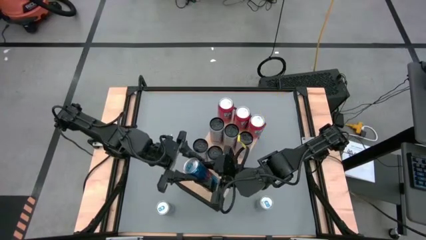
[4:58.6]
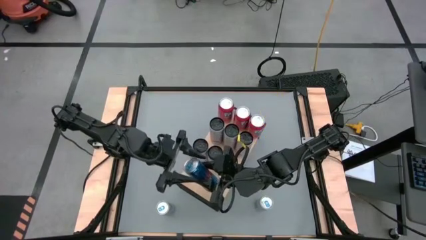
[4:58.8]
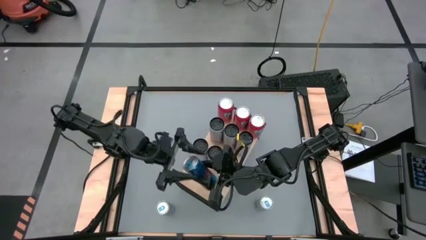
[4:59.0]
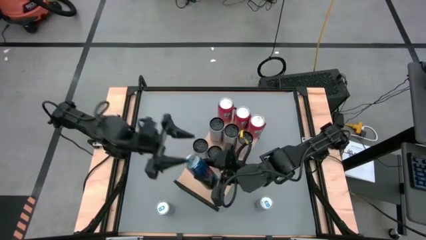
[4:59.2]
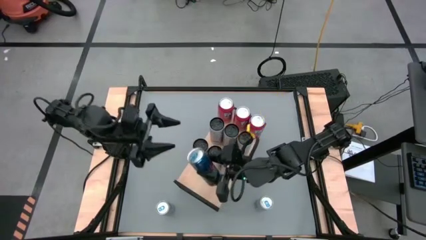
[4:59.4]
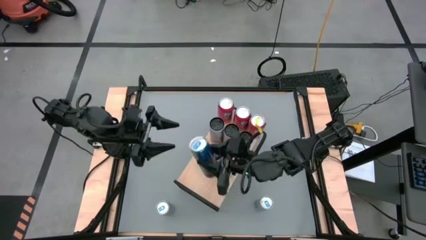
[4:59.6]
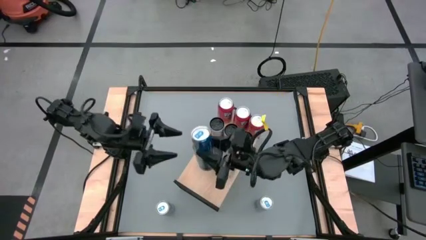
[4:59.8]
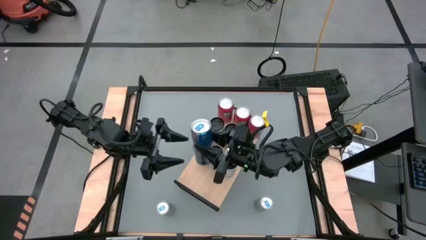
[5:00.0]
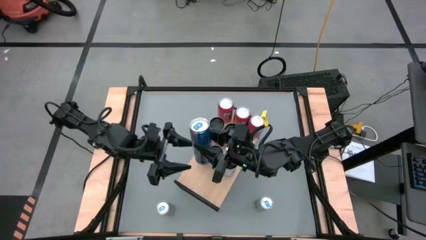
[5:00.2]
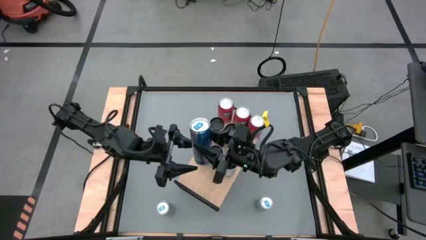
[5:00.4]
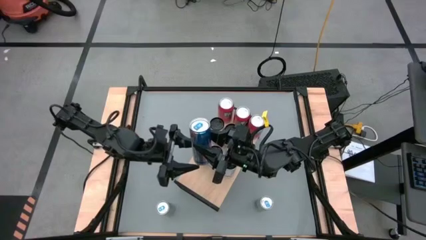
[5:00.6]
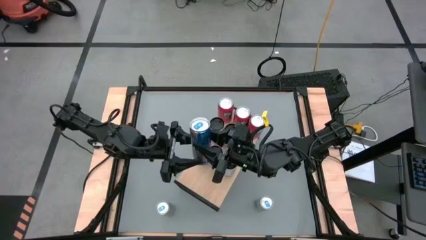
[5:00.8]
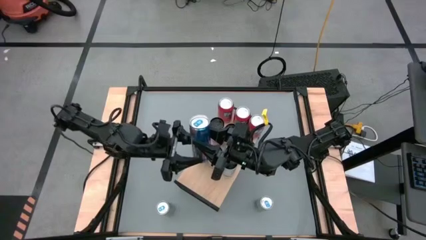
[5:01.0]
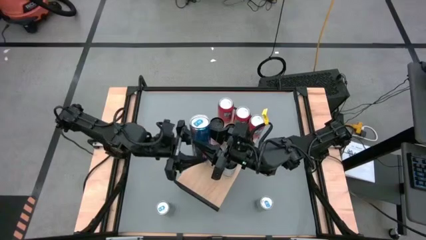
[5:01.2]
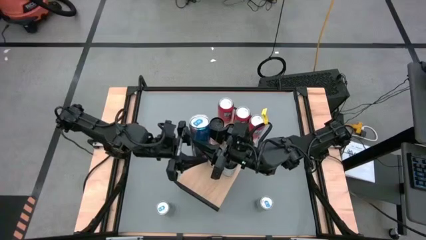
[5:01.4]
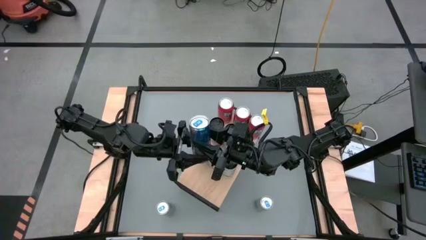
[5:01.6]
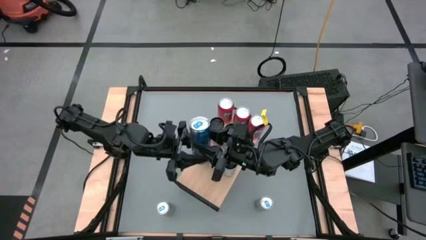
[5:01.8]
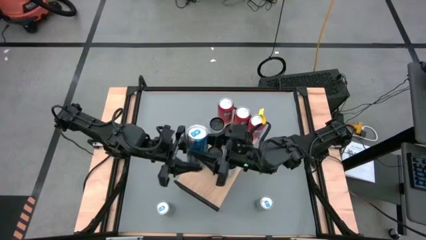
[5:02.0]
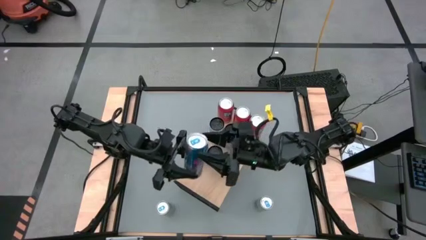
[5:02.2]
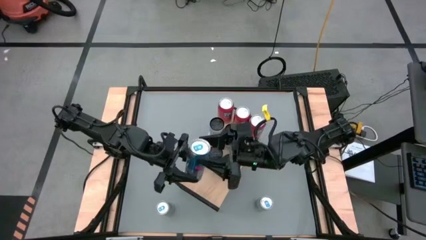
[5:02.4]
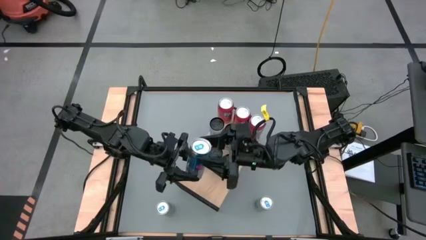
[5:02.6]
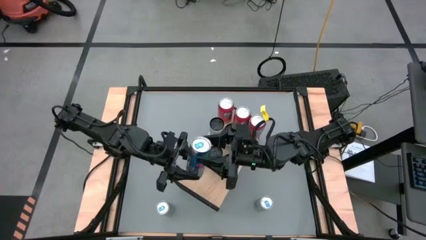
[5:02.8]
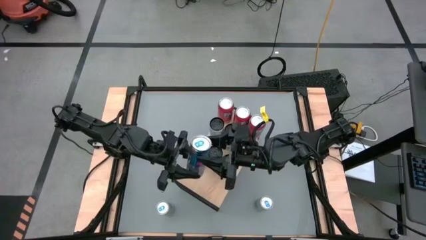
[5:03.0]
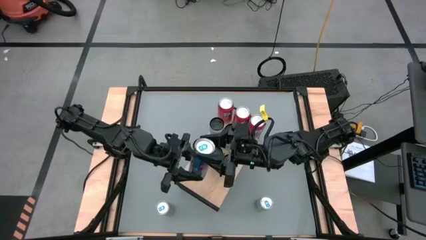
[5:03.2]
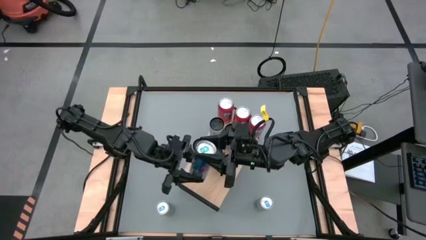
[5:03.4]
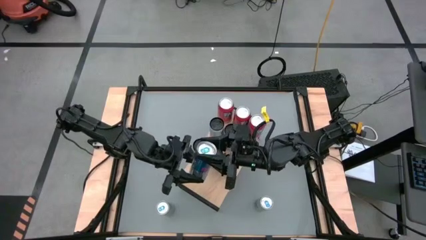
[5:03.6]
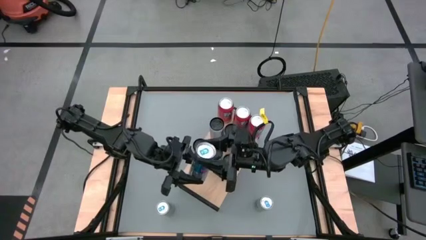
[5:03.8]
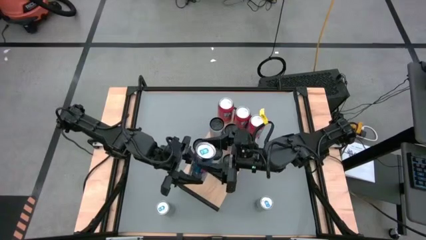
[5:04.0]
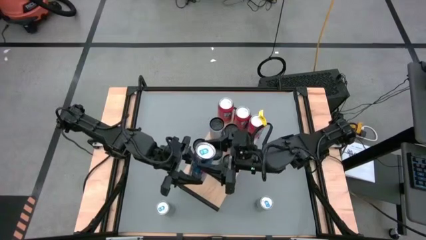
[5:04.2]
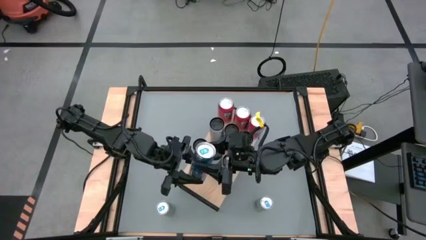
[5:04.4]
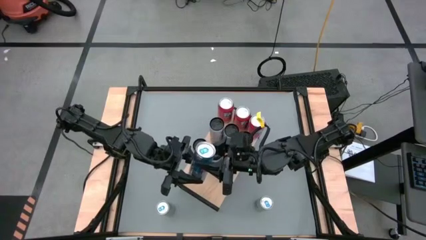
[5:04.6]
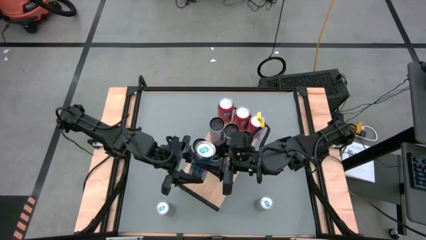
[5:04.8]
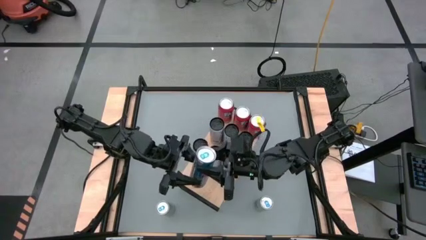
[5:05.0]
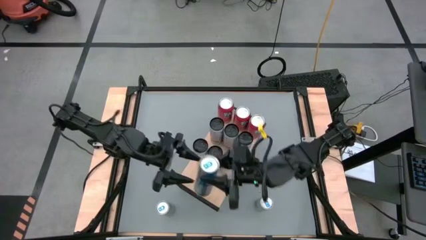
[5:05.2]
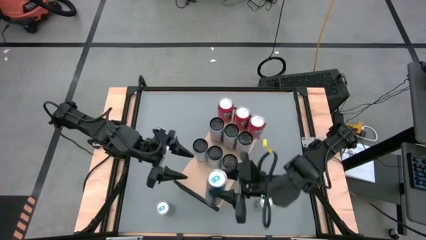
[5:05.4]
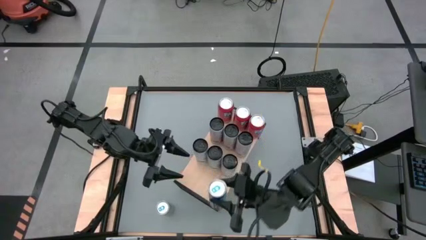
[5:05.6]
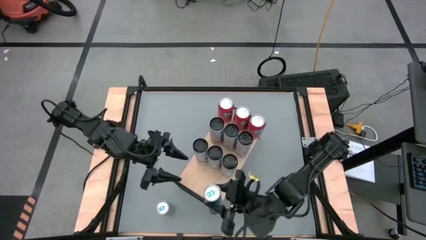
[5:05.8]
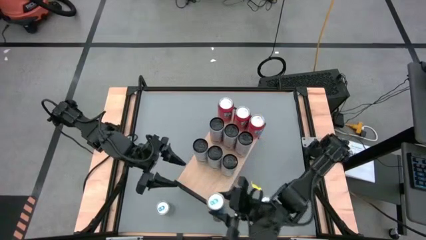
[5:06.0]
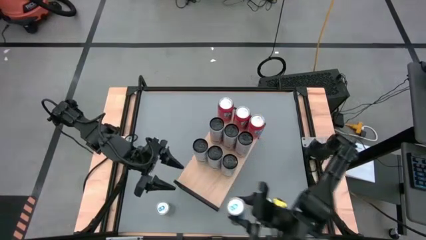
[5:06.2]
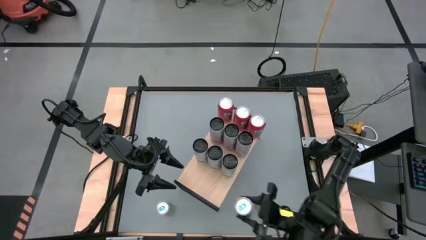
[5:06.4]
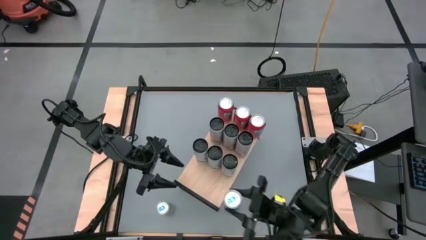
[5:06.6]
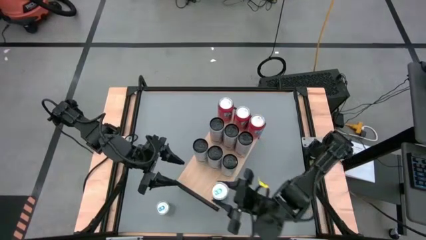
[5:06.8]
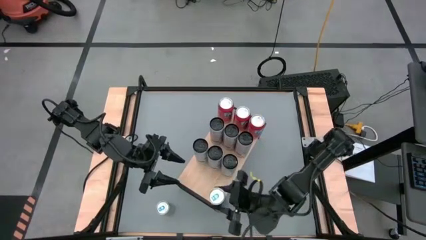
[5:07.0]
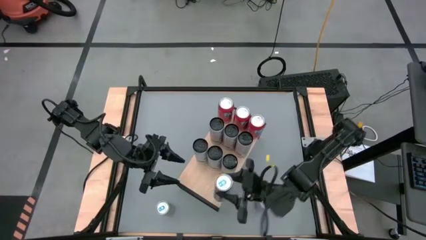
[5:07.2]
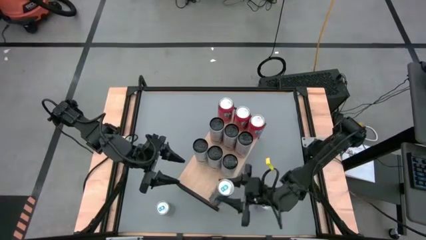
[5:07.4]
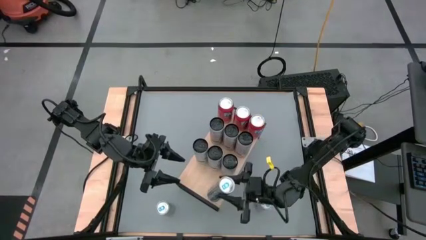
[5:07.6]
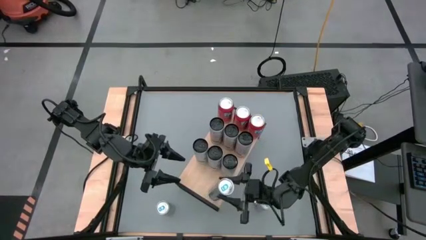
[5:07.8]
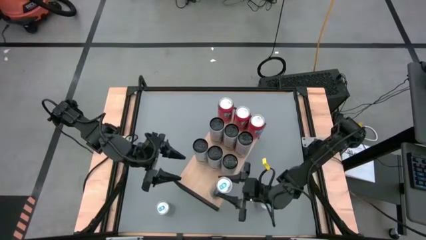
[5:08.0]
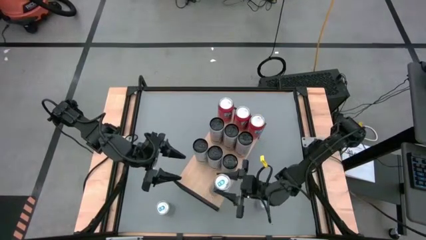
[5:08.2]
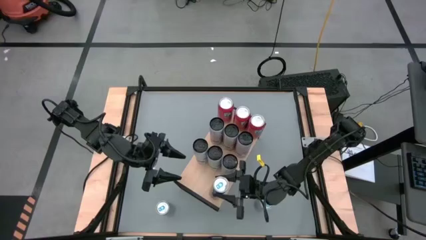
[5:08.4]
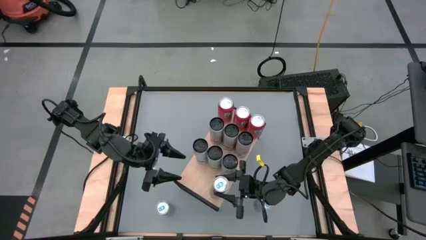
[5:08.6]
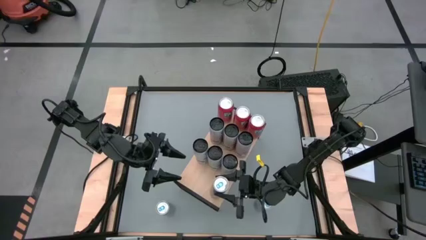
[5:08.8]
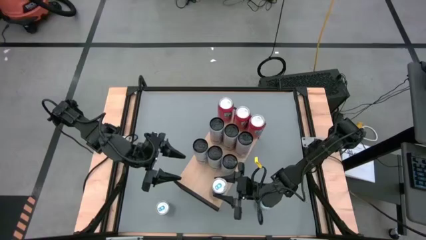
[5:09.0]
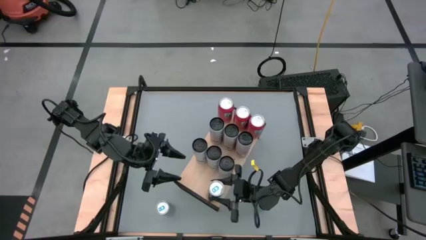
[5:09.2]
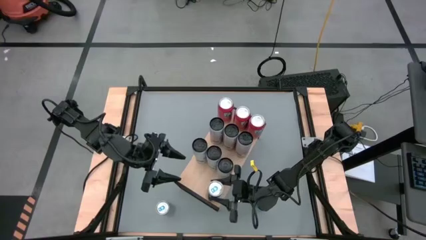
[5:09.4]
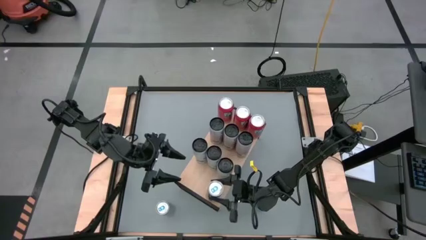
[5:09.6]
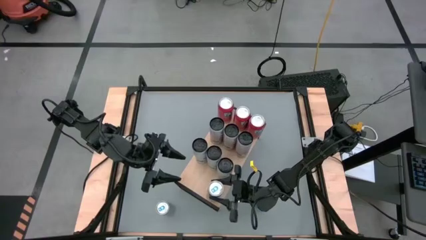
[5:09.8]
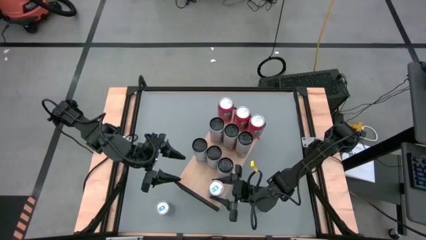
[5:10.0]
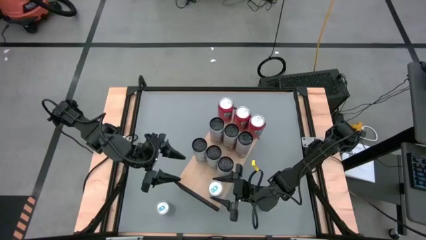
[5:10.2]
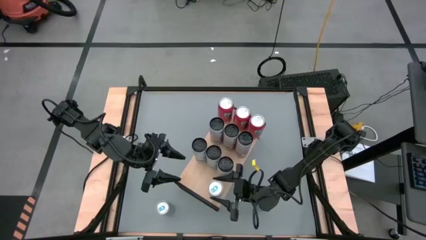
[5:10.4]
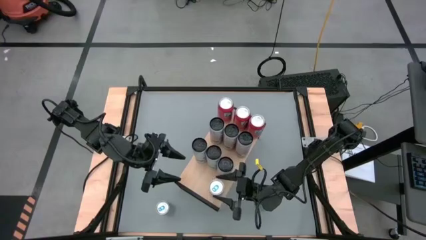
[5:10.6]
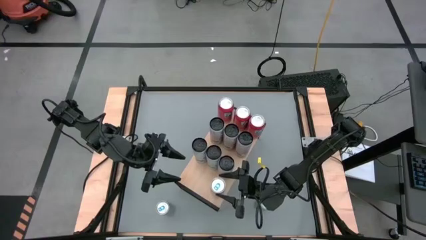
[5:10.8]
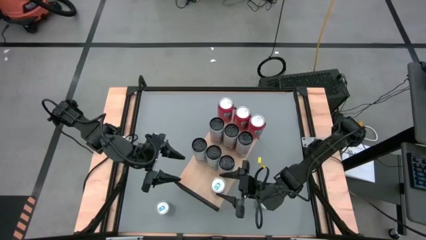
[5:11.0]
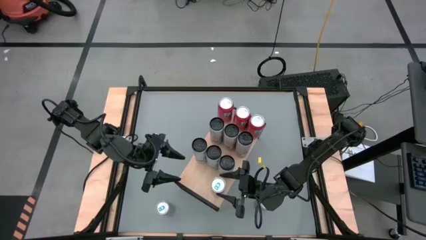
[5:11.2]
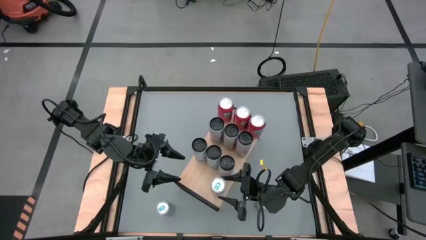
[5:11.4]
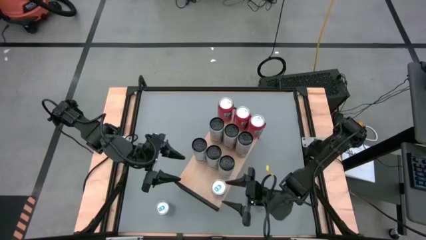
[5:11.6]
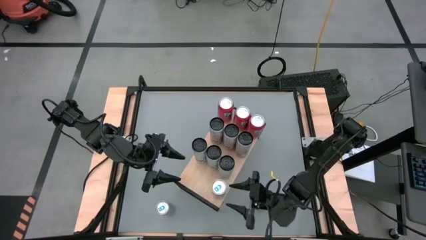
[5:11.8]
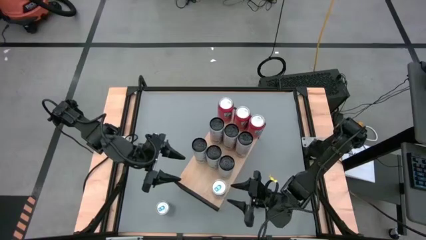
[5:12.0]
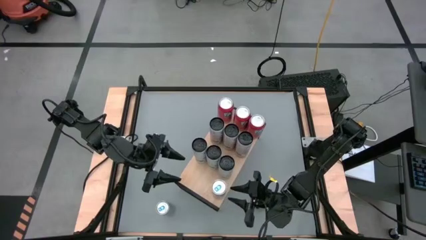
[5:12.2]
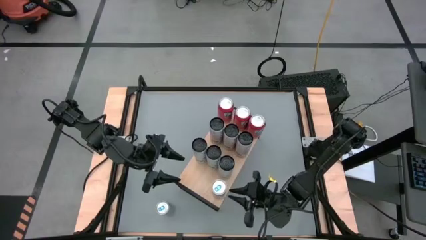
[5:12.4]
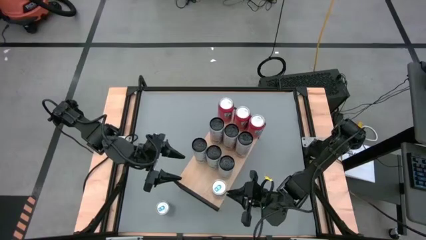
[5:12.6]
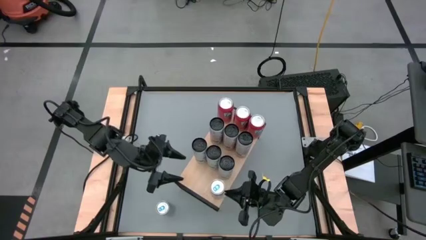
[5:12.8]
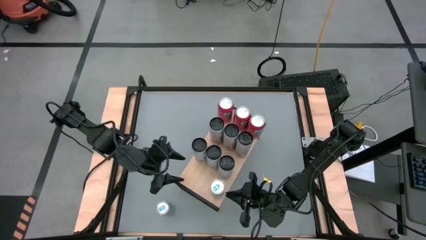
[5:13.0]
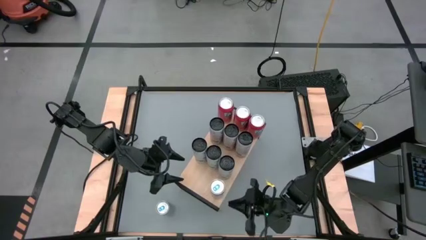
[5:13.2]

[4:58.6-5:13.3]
Task: Place canned beverage on shelf
Put the blue soda can on the shelf

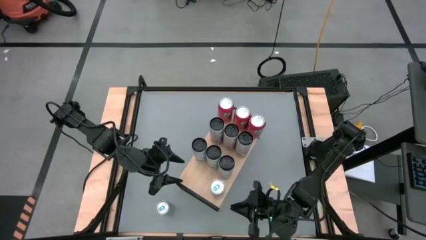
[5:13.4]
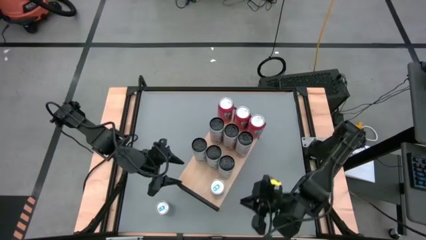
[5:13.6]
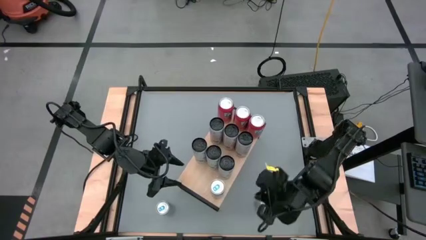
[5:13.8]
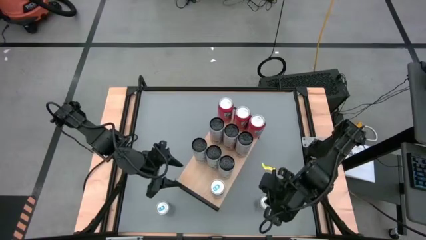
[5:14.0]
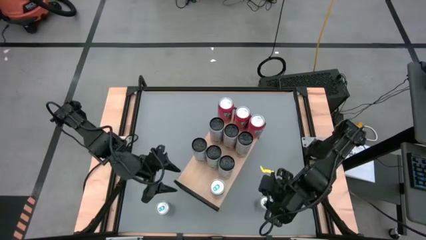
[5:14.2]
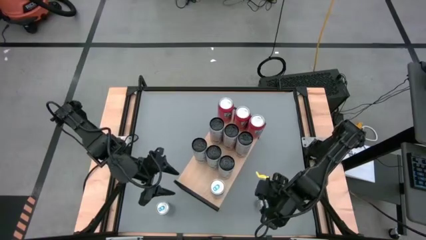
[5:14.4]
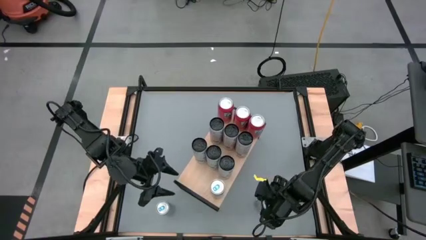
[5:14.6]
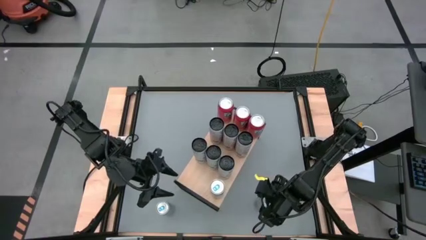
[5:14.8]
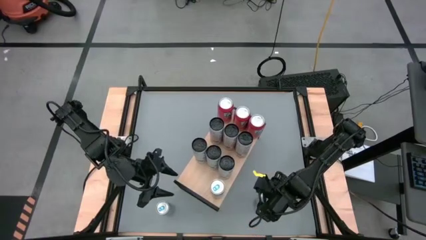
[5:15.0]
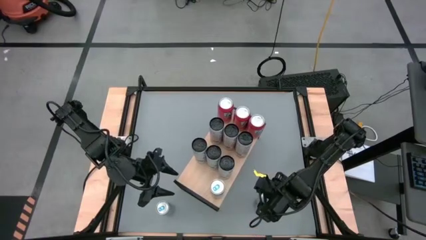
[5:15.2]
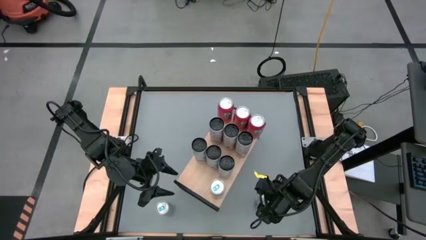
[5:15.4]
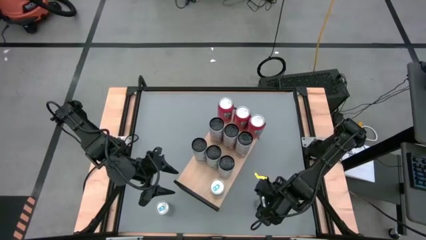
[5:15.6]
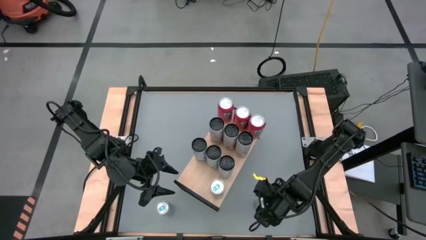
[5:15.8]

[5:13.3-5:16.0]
Put the blue soda can on the shelf aligned with the other blue soda can
